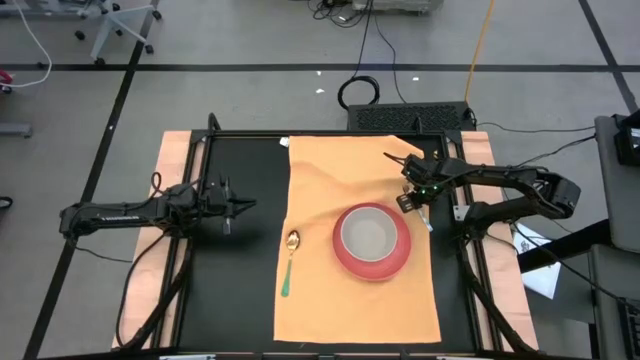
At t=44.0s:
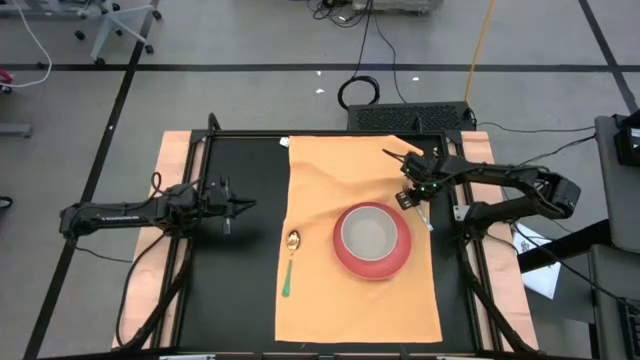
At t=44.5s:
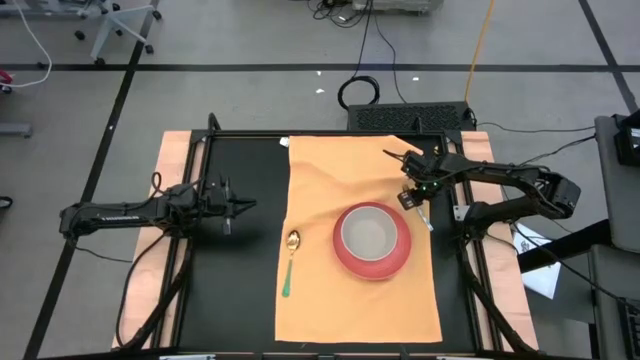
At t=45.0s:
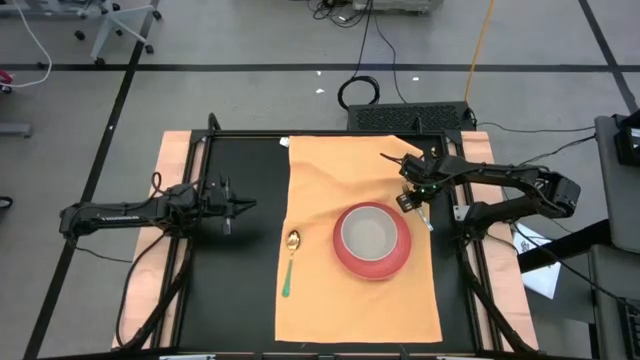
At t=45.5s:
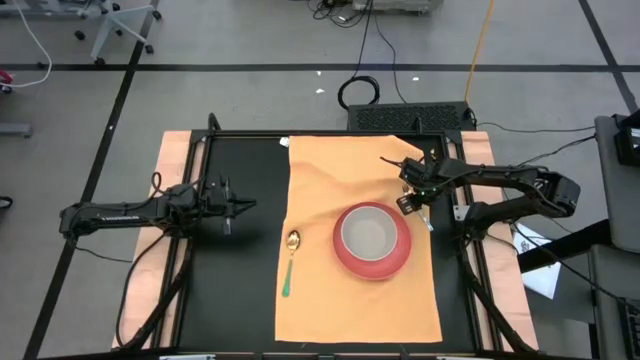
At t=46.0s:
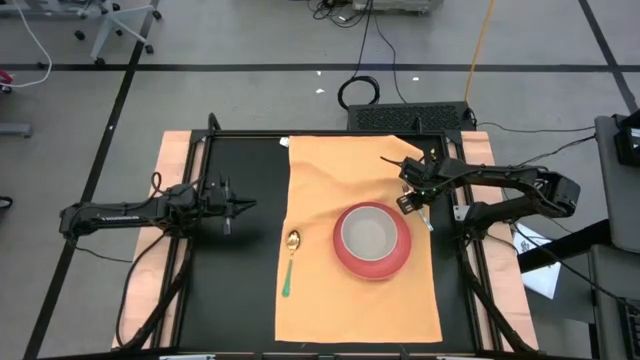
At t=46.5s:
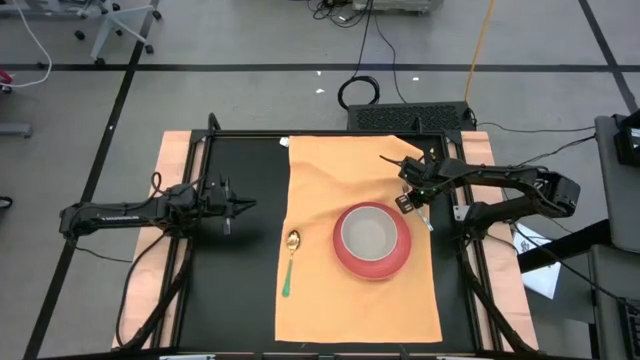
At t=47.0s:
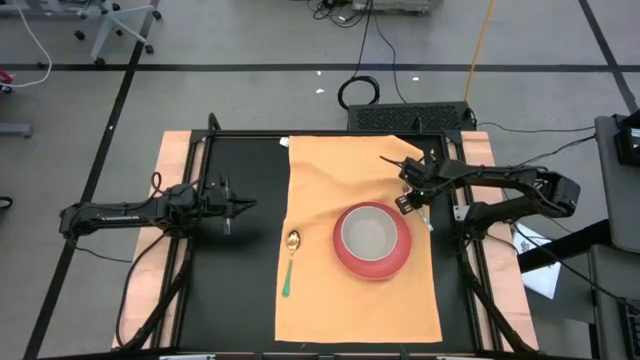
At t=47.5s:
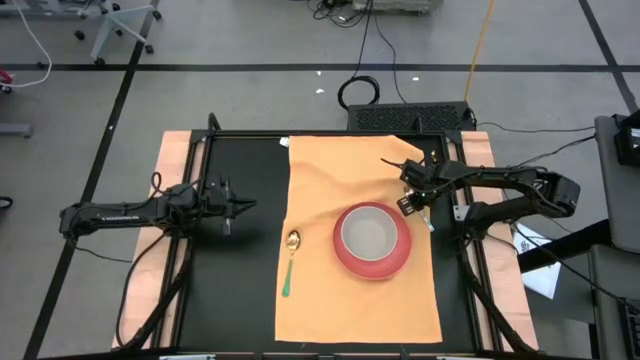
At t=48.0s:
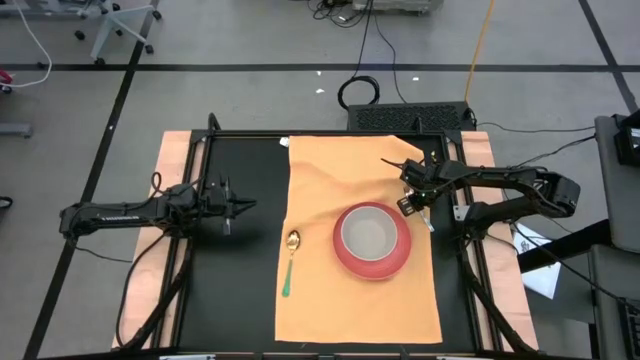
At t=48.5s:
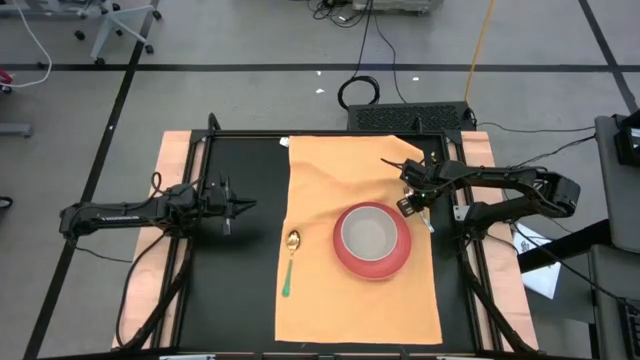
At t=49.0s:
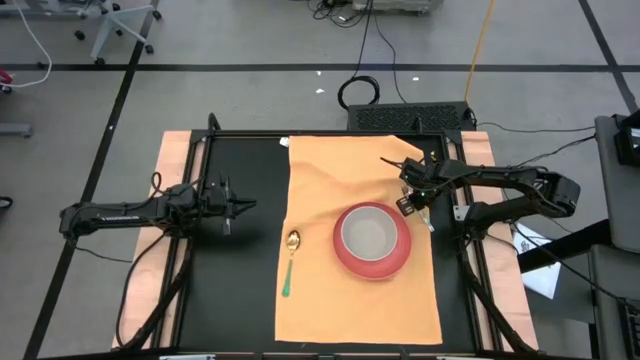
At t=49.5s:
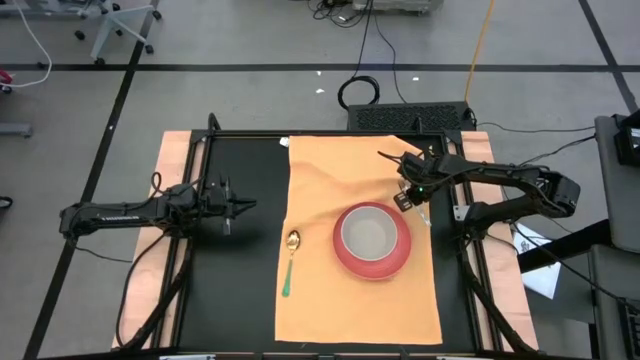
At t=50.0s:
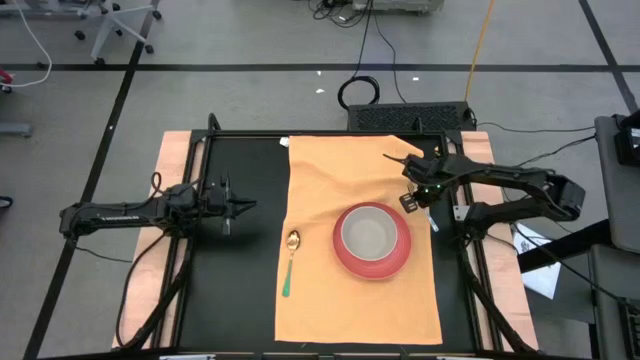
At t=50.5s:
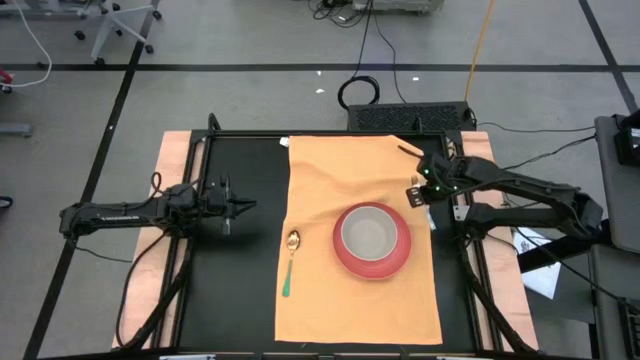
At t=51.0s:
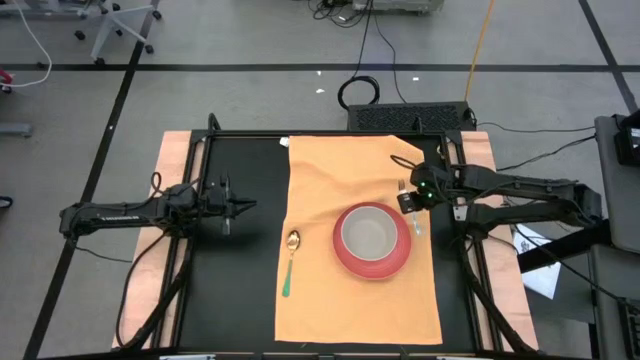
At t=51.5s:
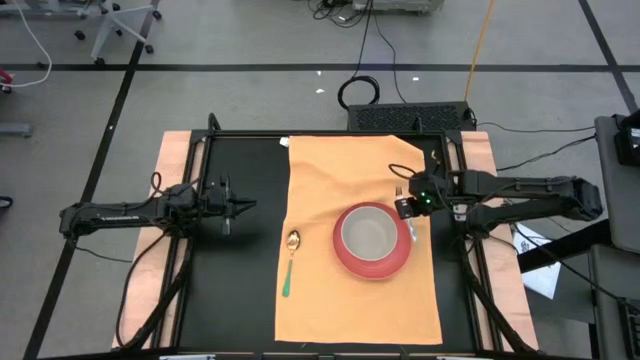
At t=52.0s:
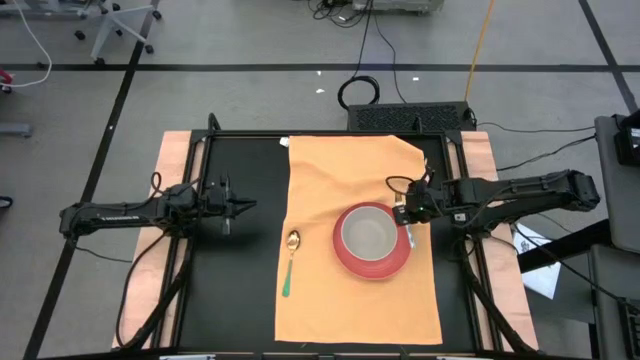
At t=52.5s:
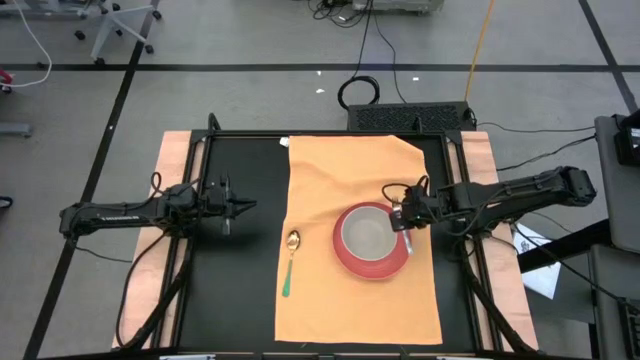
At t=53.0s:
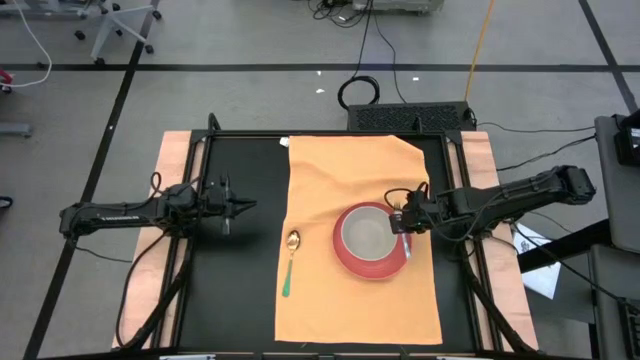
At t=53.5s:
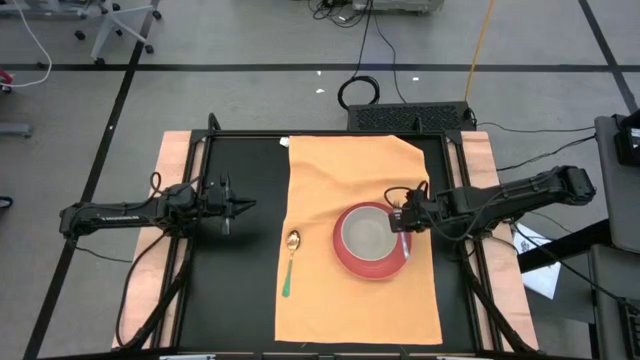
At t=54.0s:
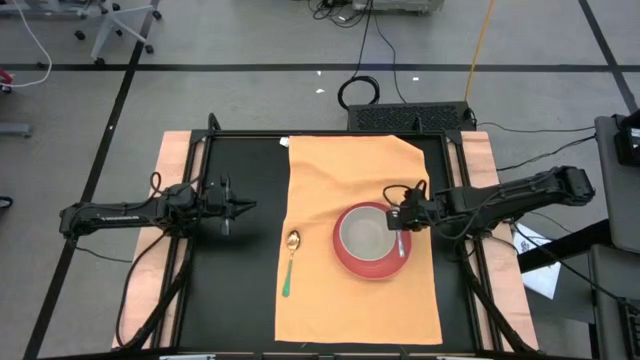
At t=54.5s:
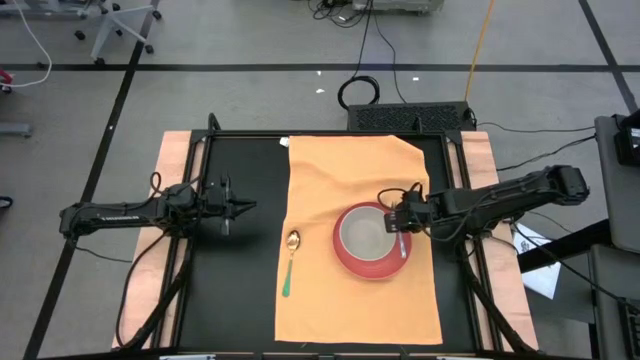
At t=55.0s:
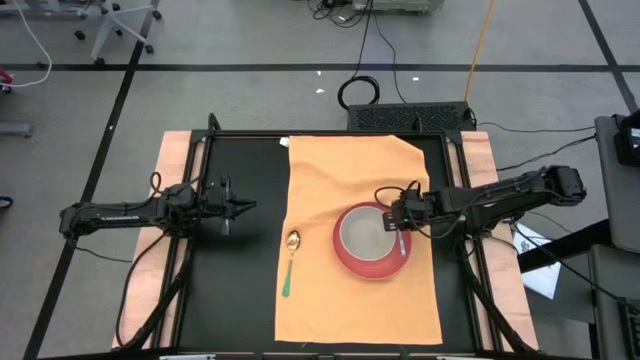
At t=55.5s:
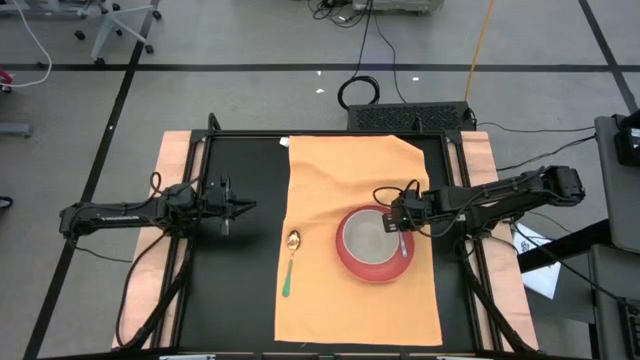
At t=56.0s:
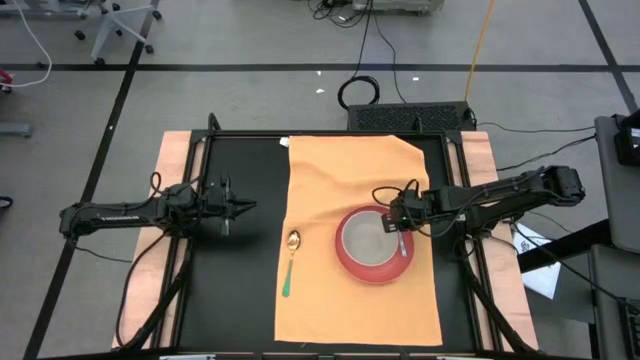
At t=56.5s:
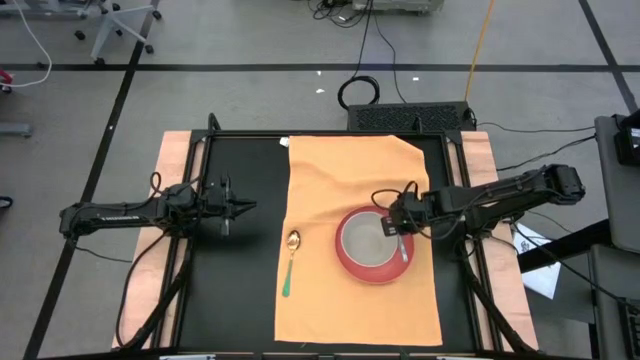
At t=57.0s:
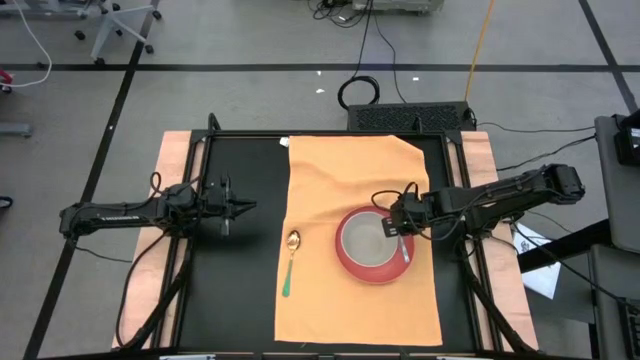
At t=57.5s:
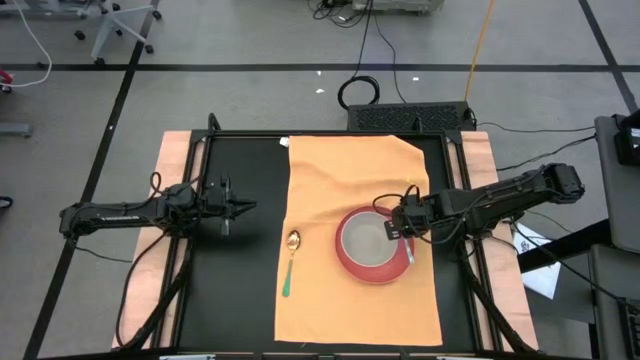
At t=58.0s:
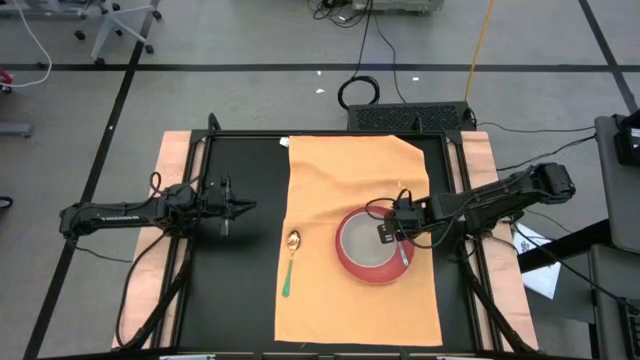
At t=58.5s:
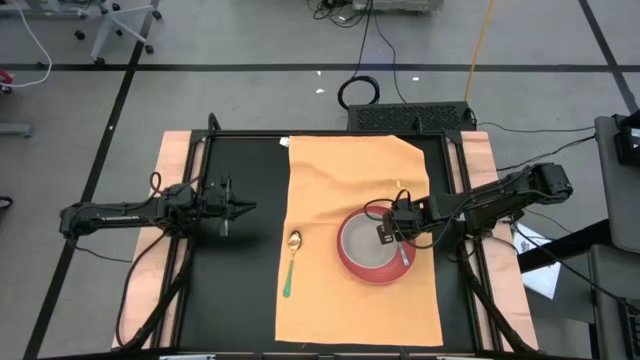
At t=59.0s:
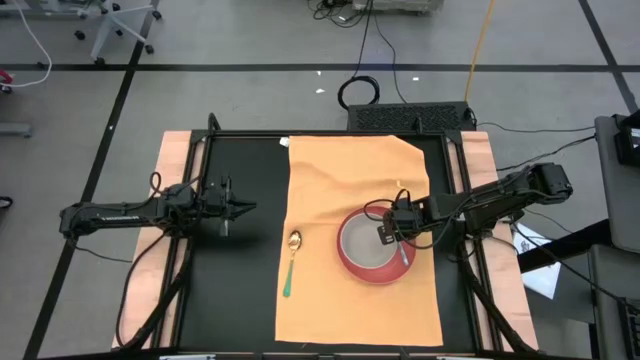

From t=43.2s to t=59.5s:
Task: Set table place
Put the fork to the right of the plate on the napkin

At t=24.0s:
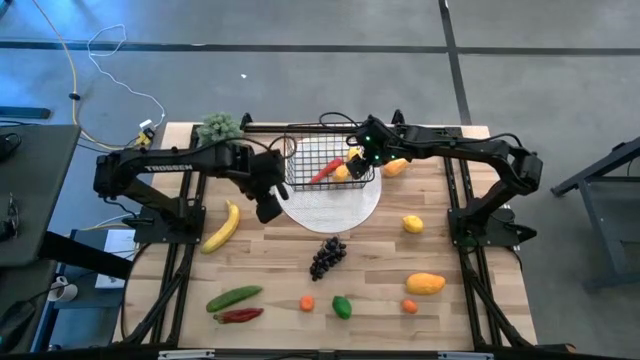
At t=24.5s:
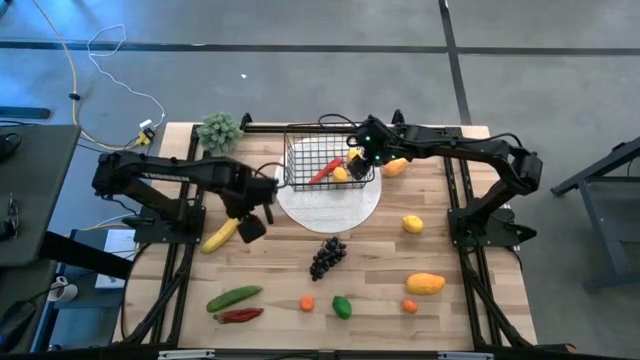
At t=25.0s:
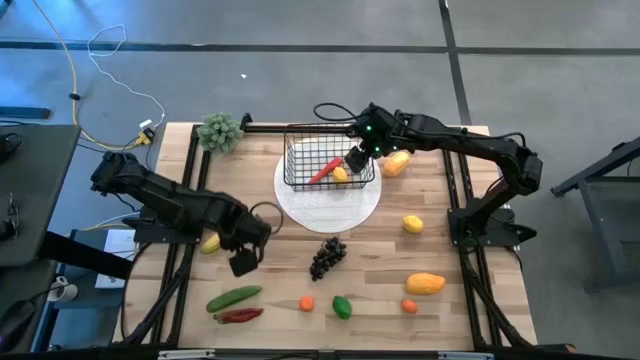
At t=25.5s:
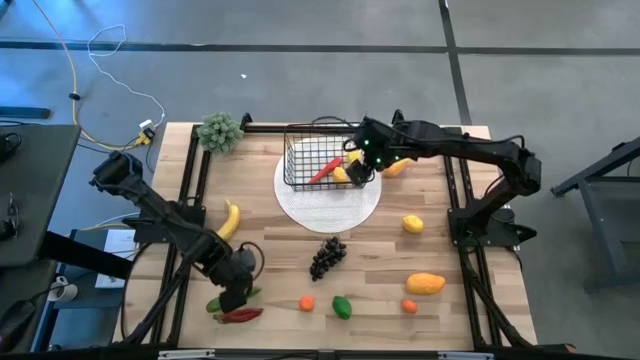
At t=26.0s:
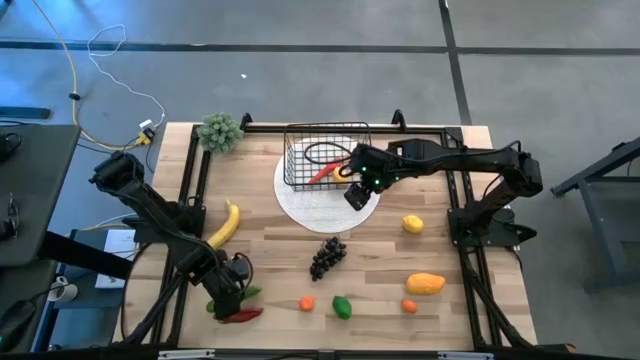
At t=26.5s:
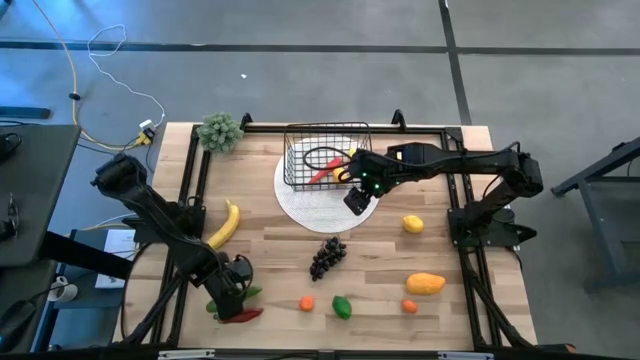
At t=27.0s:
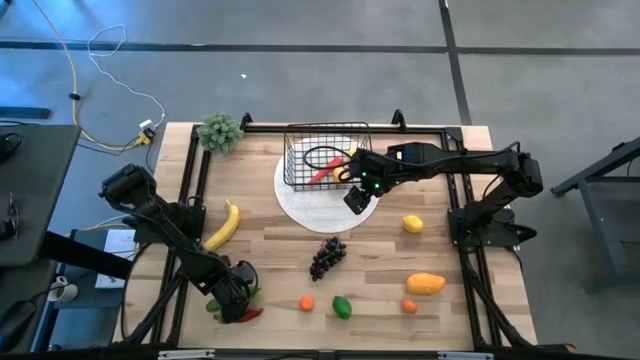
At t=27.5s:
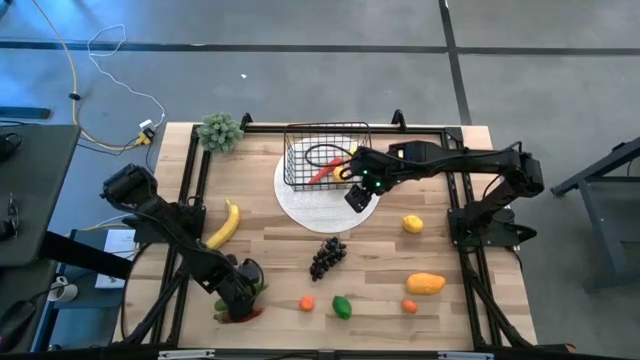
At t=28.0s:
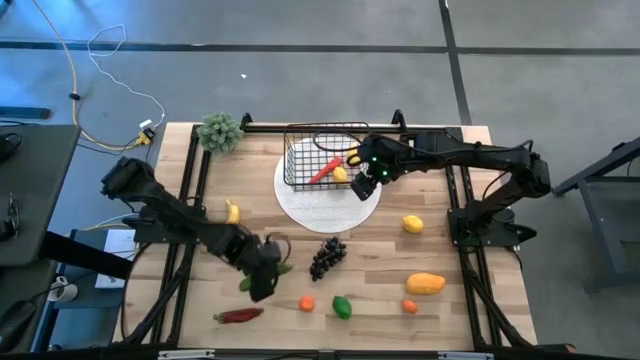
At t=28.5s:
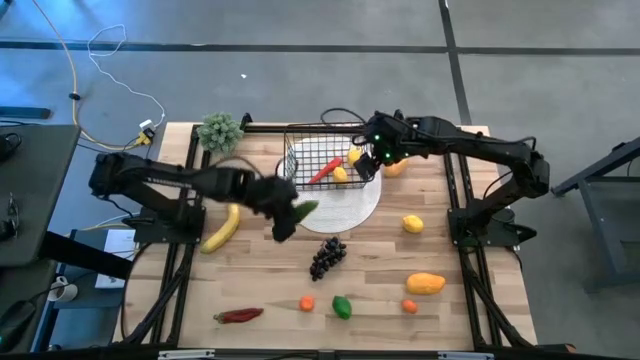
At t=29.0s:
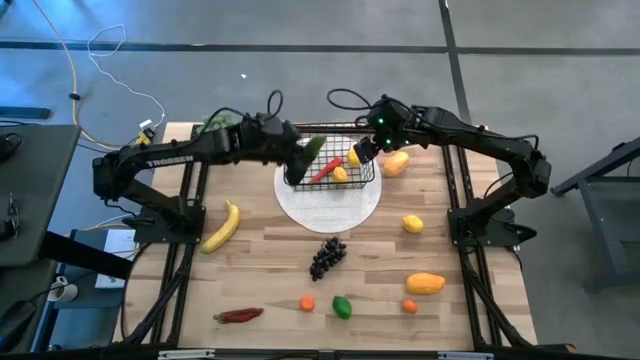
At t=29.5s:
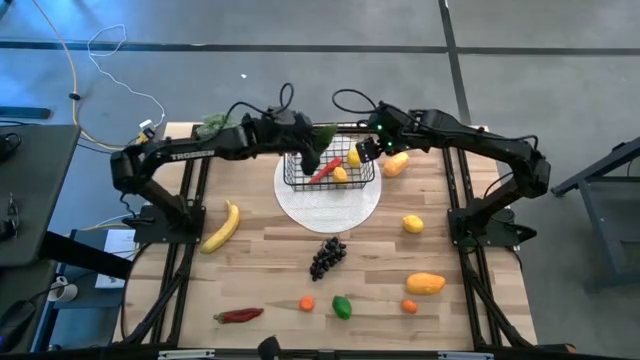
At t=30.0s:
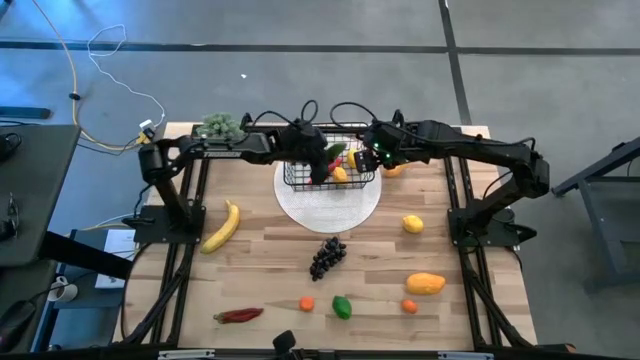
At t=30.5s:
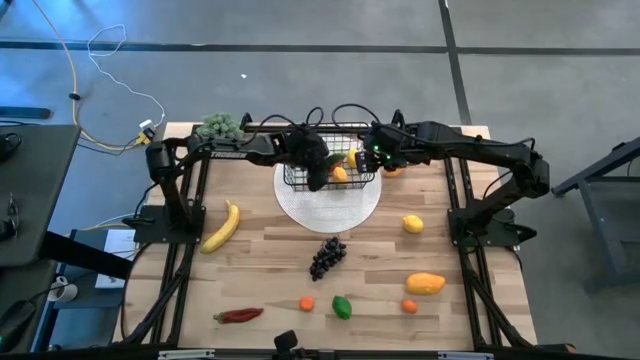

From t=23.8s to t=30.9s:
Task: Build produce basket
Put the green cucumber into the black wire basket
